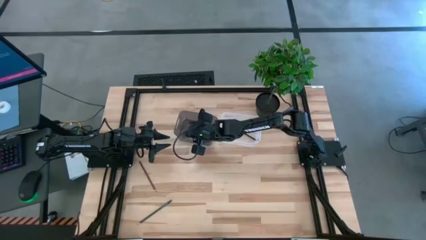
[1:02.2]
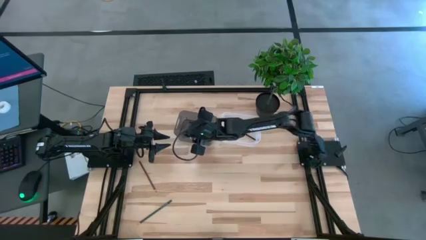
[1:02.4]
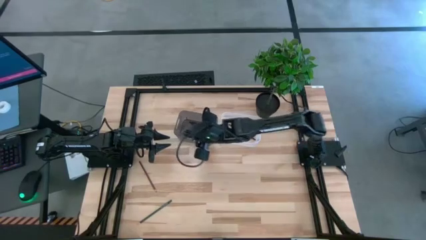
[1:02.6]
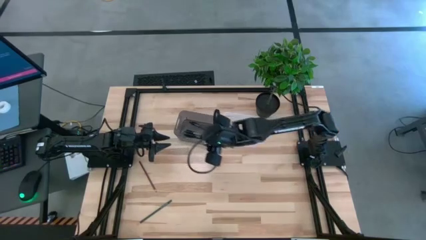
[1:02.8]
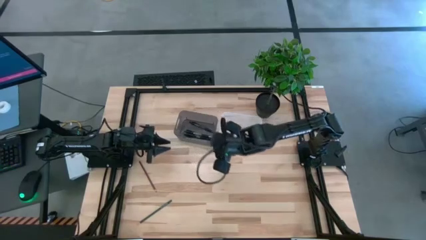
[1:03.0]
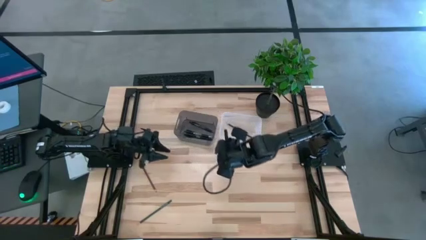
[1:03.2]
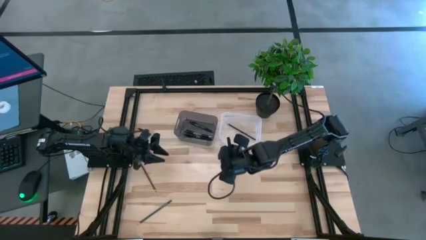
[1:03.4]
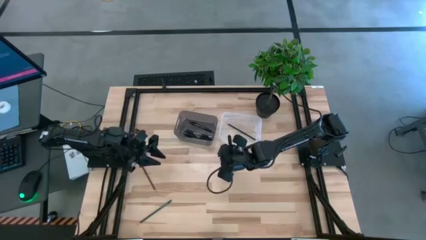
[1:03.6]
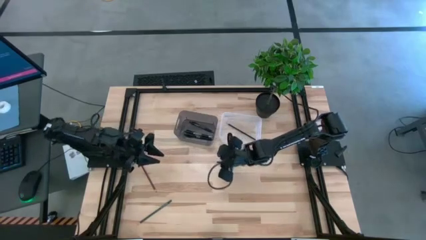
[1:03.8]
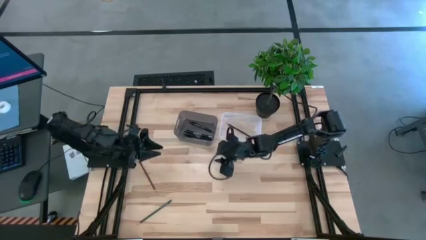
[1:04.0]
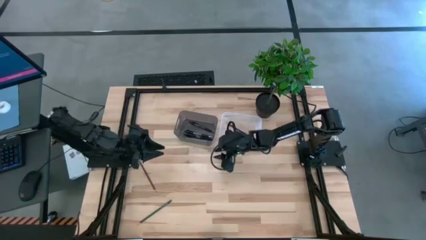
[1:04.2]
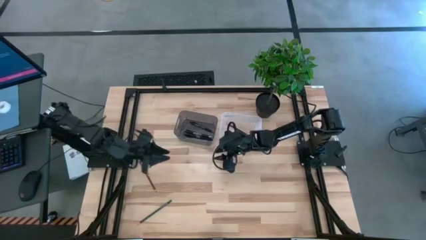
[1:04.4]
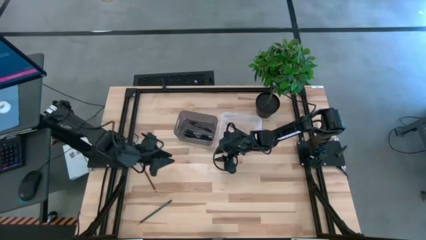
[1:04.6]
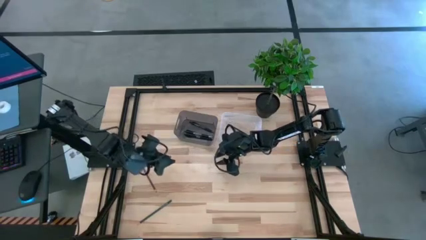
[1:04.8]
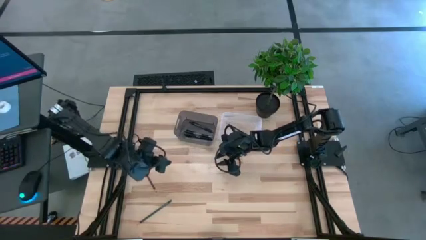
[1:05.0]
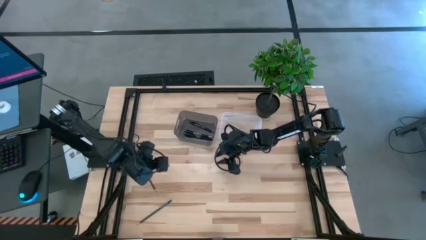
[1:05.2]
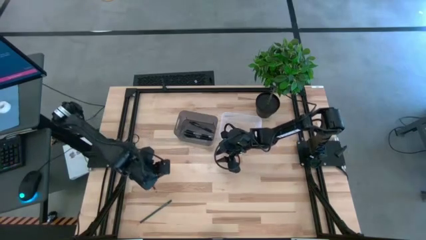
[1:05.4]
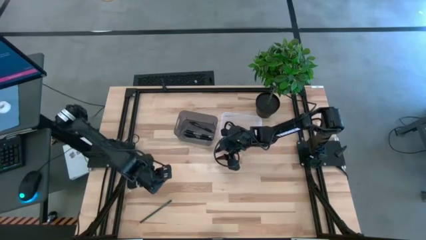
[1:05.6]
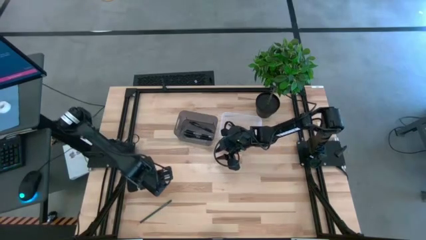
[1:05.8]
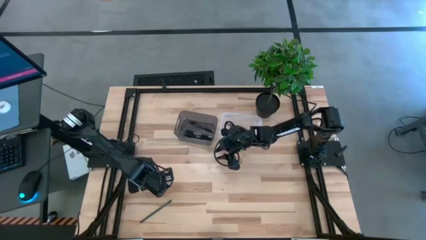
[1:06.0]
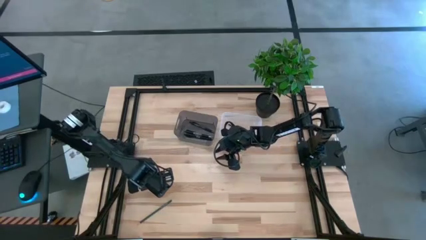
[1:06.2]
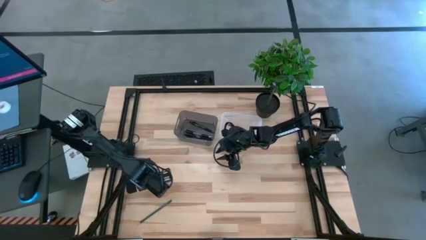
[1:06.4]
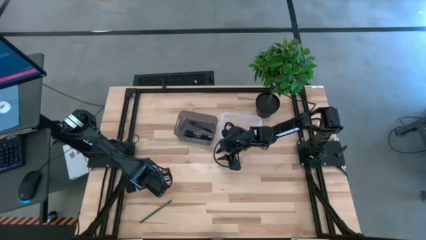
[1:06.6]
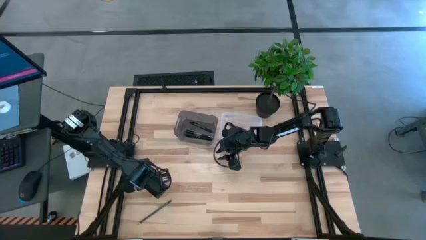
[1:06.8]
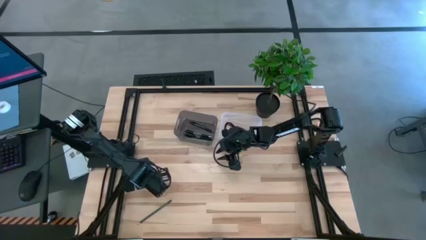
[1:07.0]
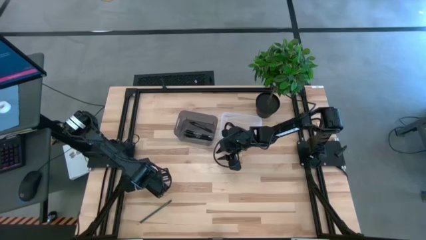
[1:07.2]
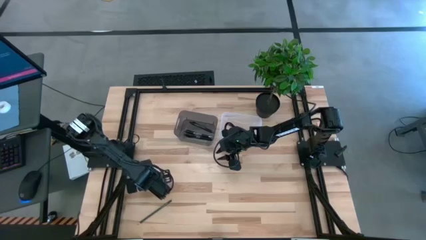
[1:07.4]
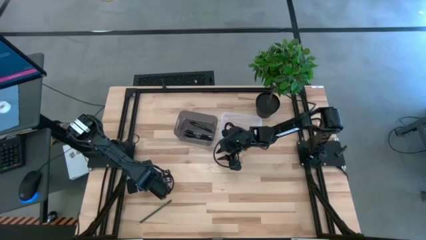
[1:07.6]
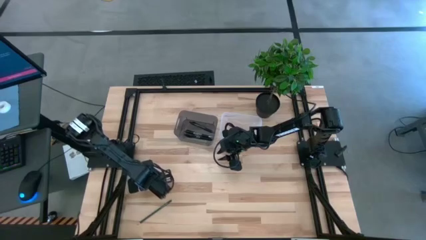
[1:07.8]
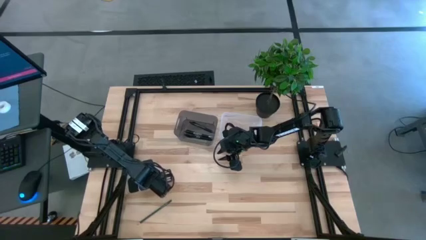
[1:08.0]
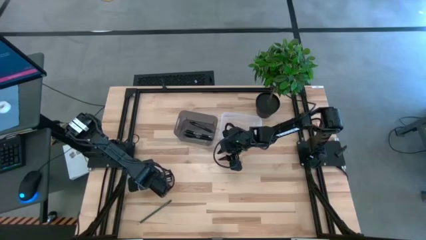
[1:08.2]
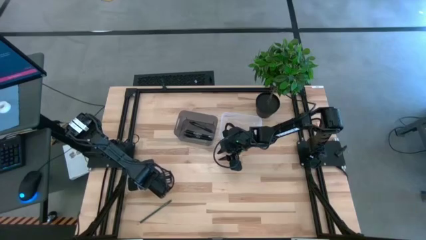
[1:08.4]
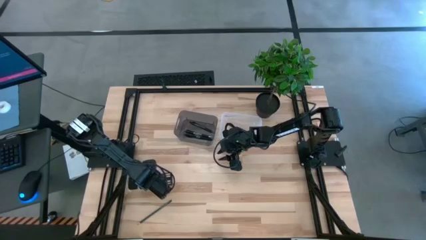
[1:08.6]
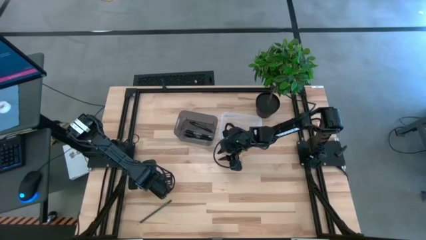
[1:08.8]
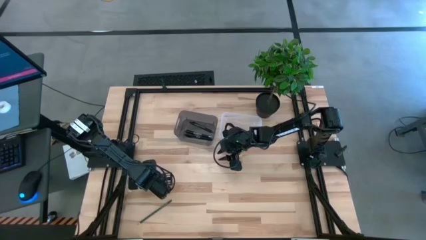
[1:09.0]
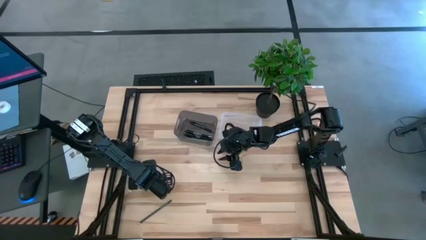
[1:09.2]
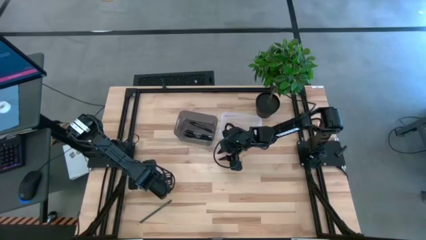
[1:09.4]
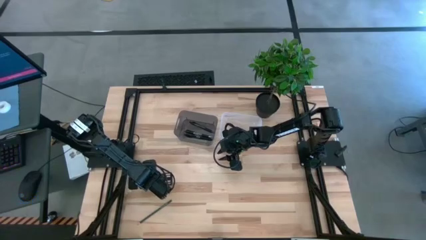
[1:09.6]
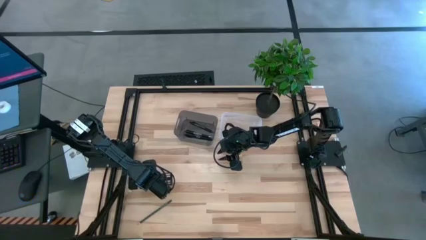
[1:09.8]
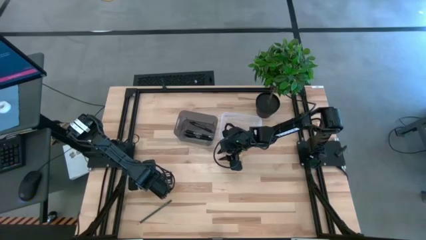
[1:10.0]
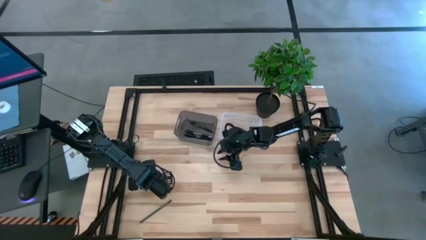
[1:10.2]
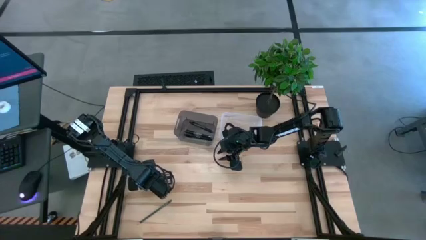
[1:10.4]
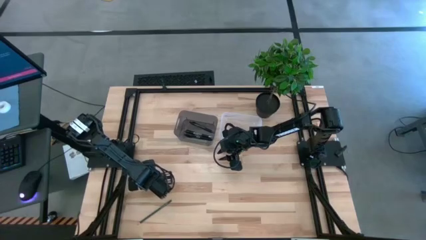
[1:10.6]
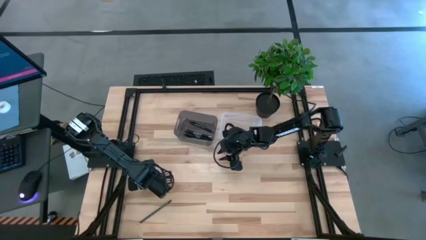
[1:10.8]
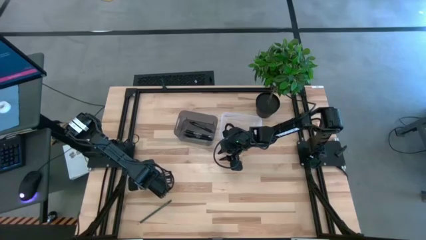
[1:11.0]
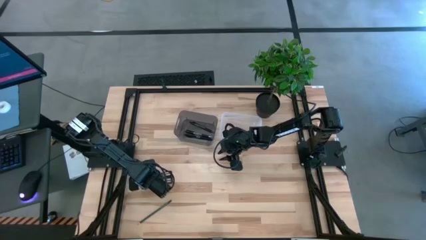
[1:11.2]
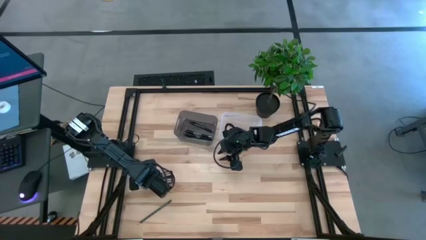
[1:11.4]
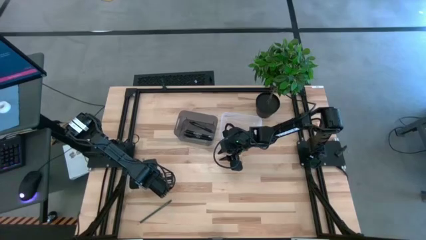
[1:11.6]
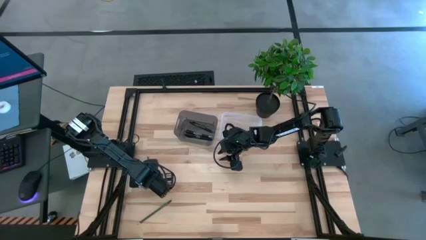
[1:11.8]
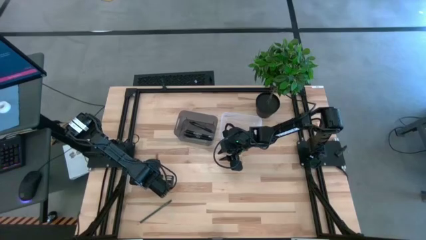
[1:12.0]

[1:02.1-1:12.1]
Task: Sort pens & pencils
Put the brown colored pencil into the transparent bin
